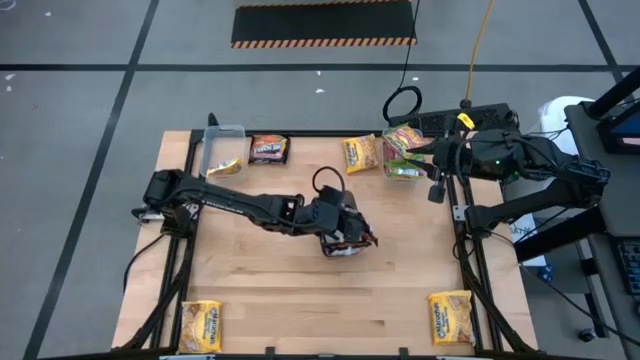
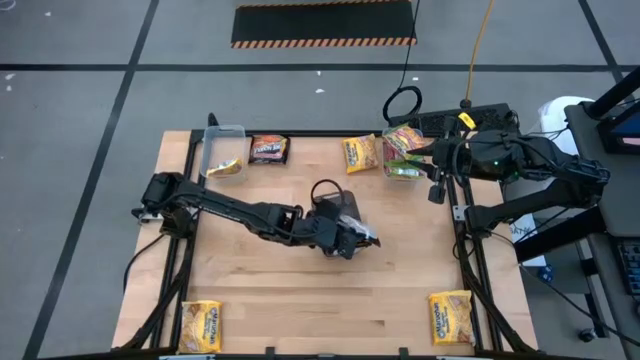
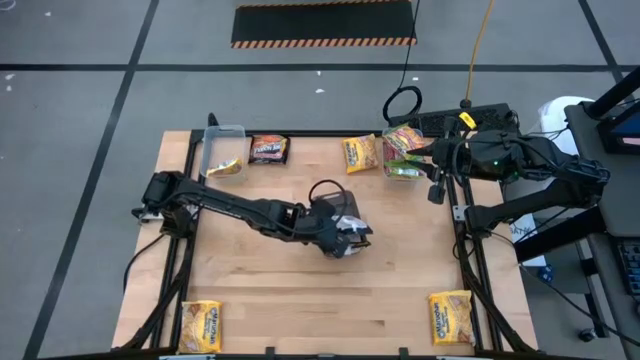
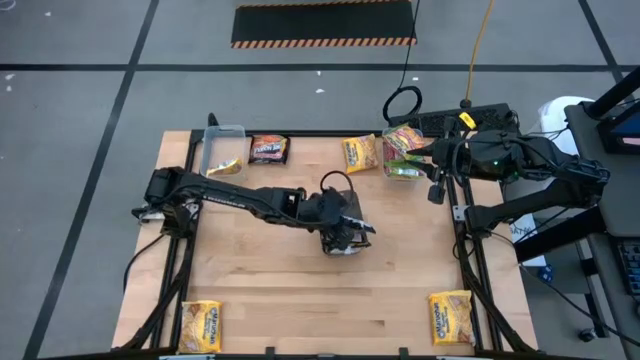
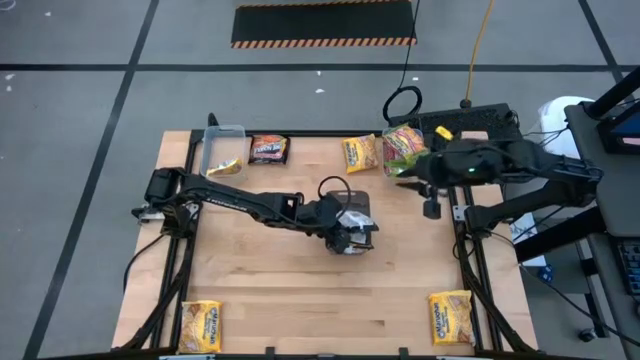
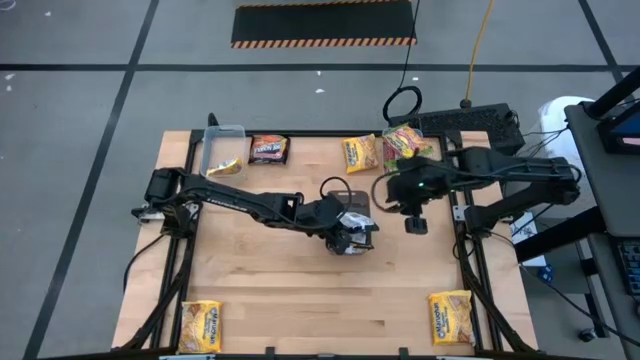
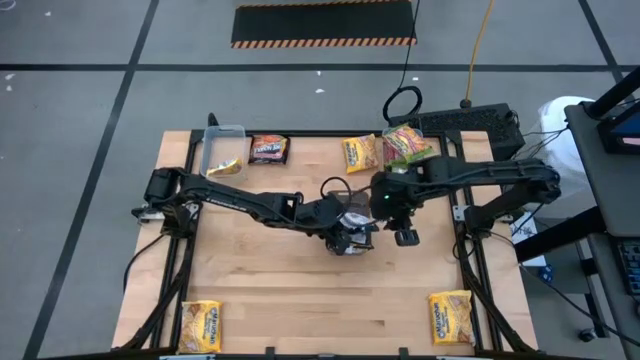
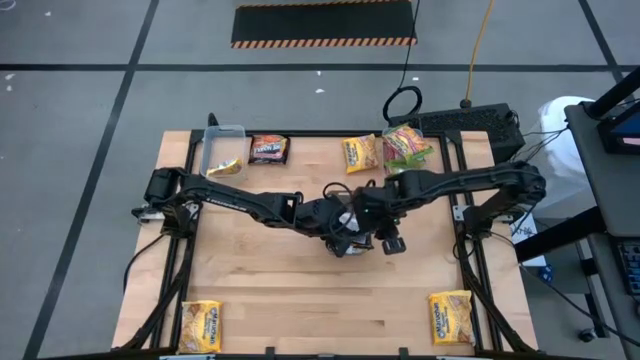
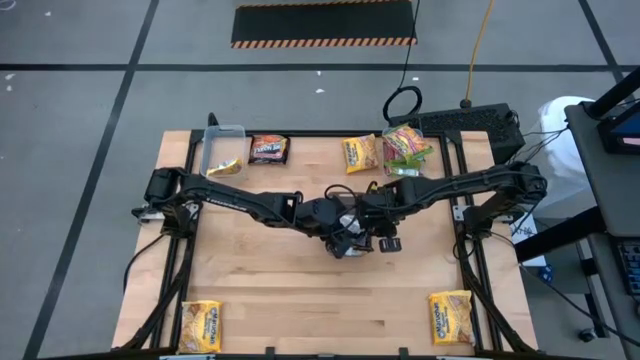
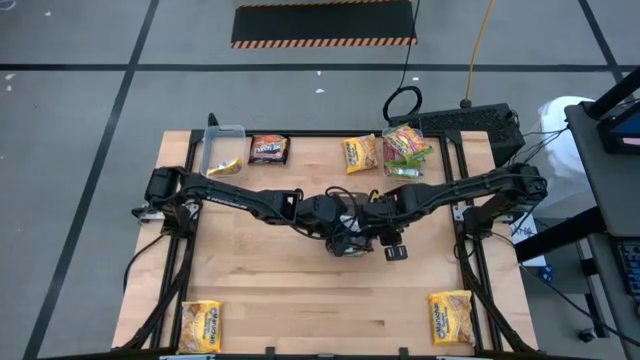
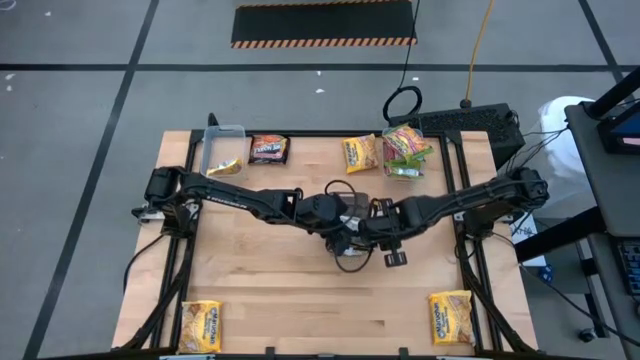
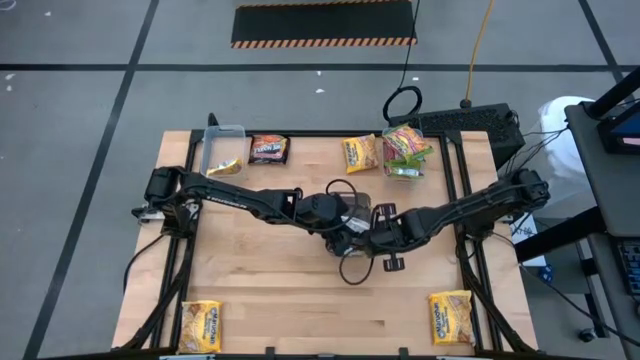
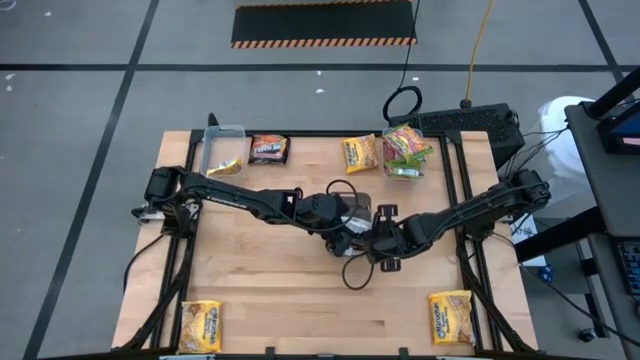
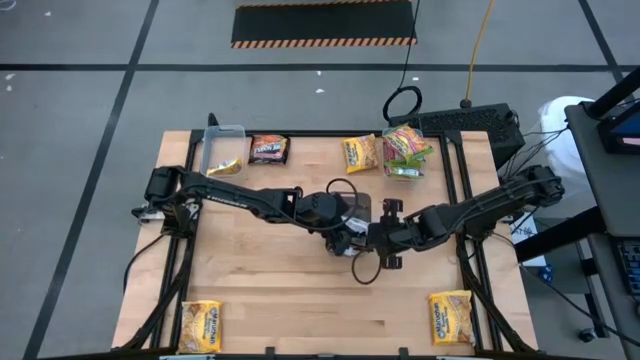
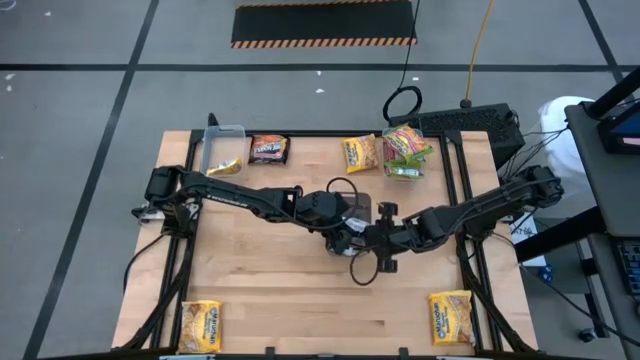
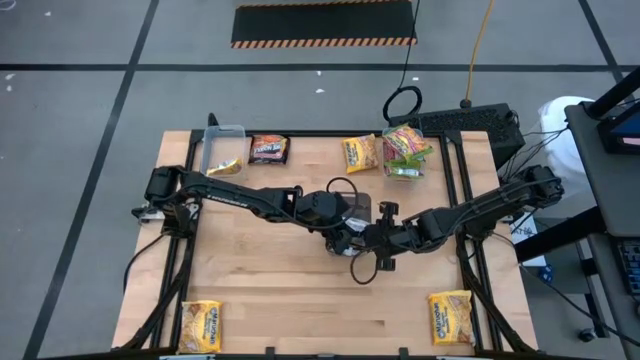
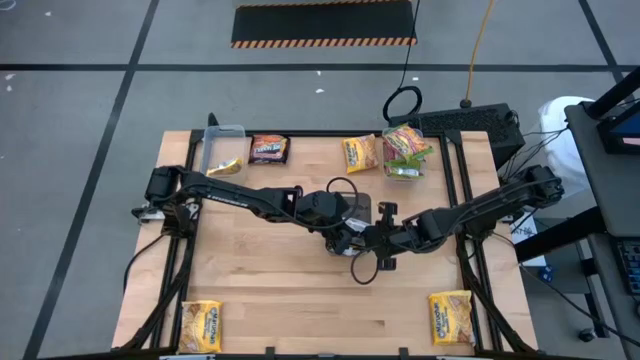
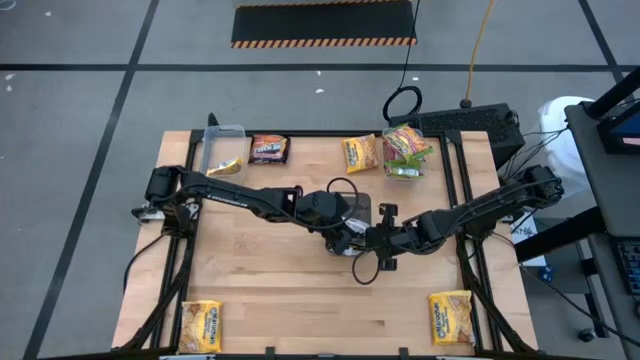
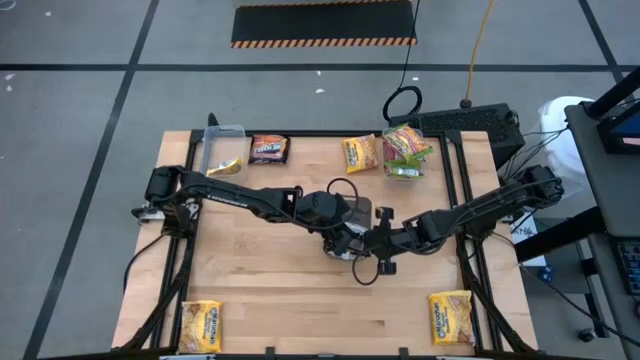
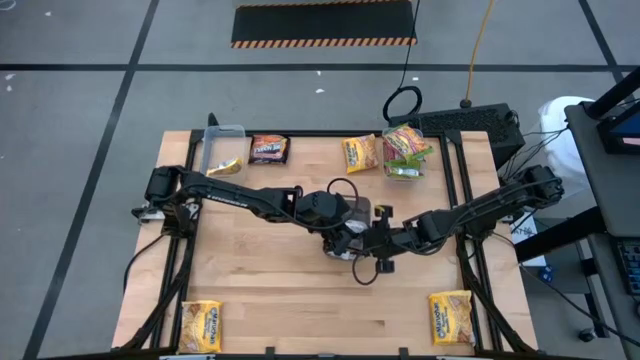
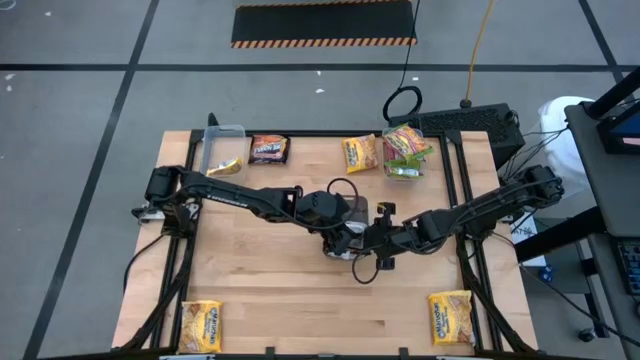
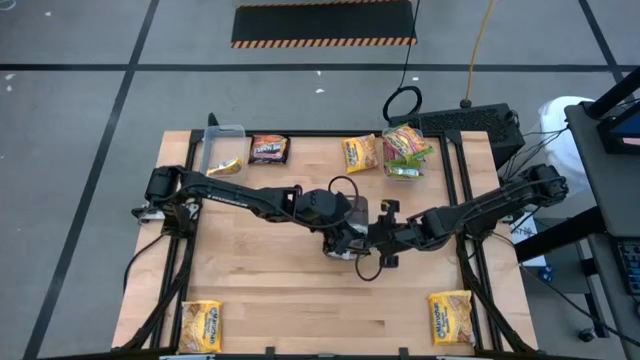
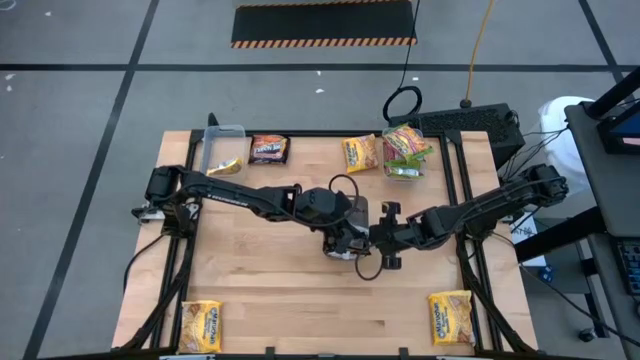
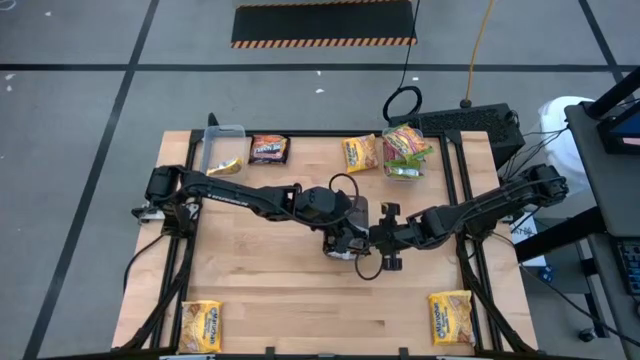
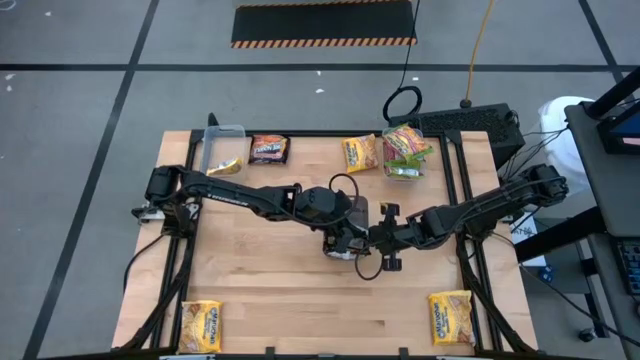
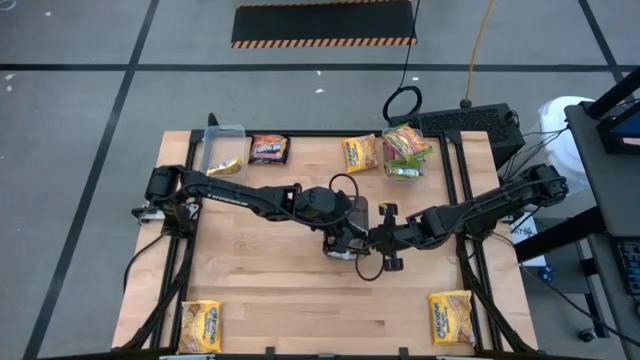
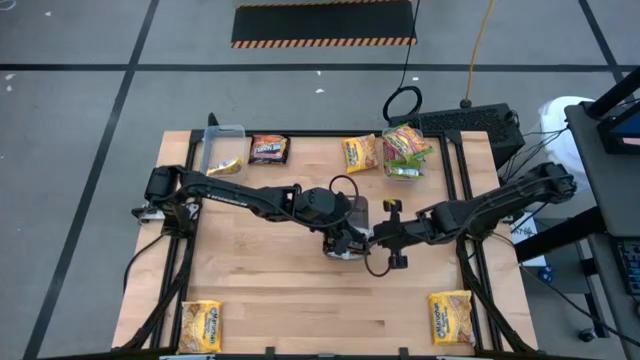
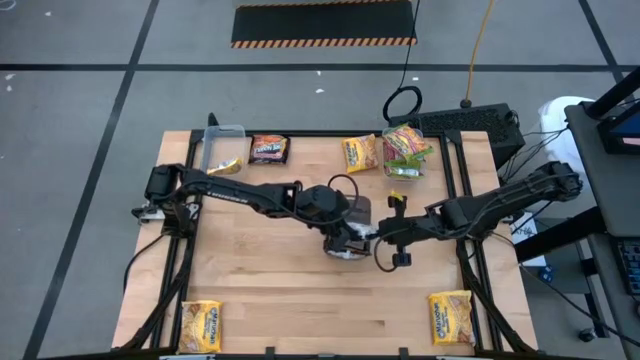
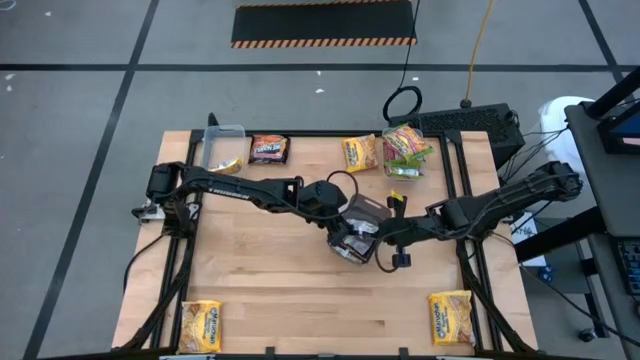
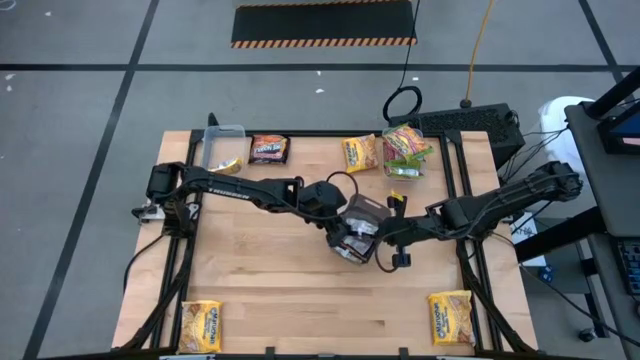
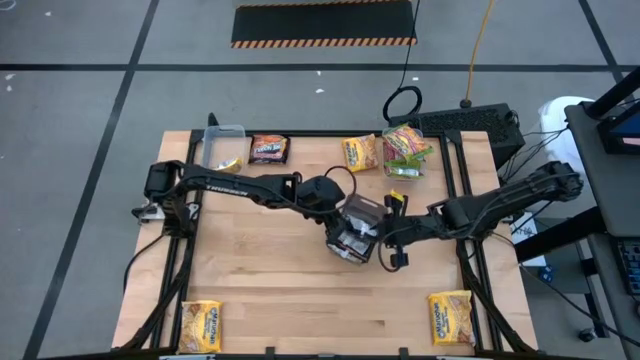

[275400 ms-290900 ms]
Task: Sort Maruchan noodles
Put the bottom black noodle pack into the black bin

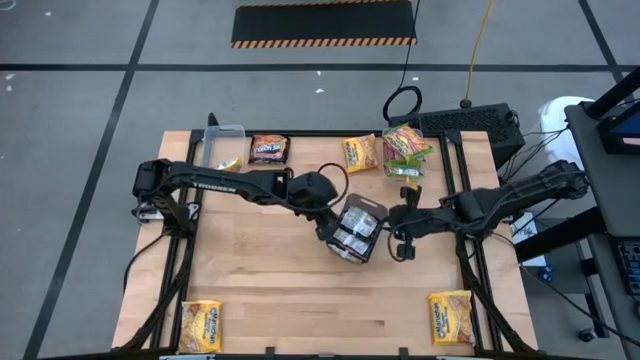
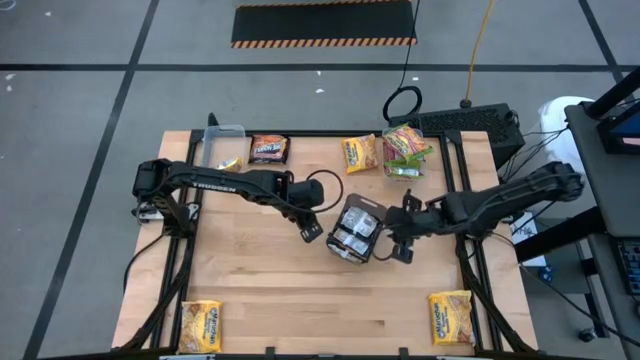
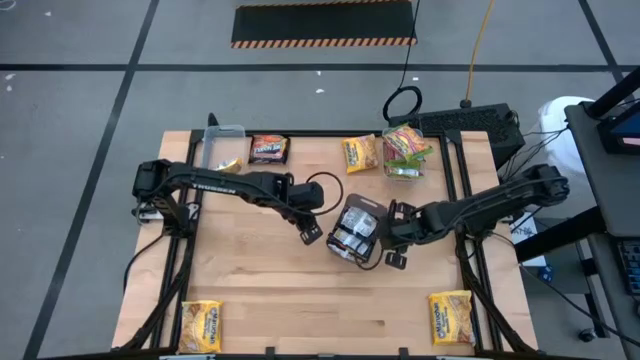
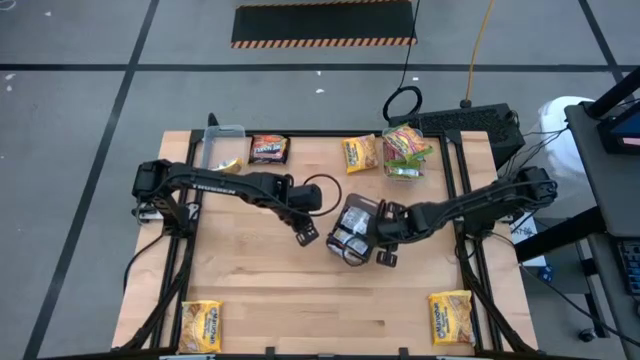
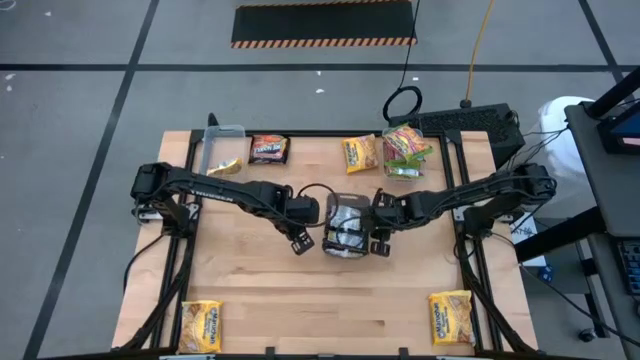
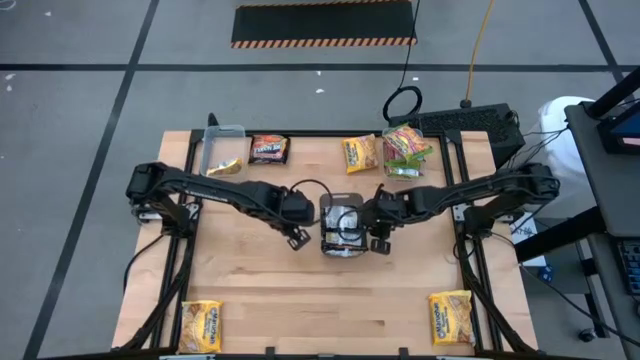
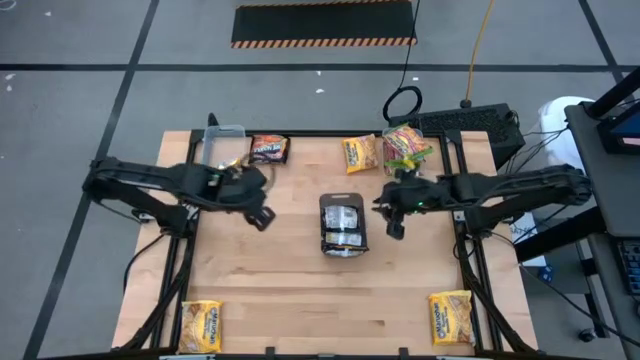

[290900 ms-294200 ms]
Adjust the black bin

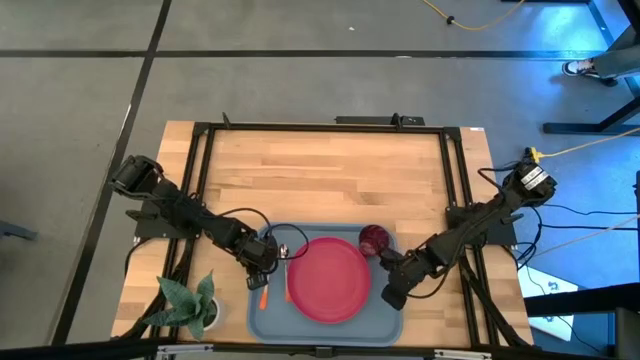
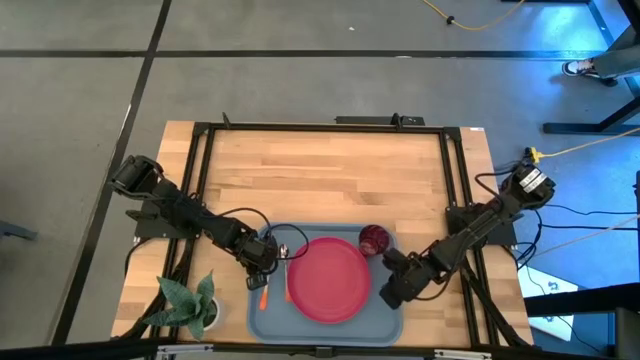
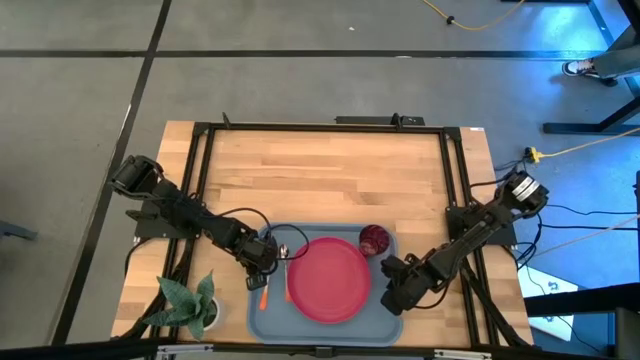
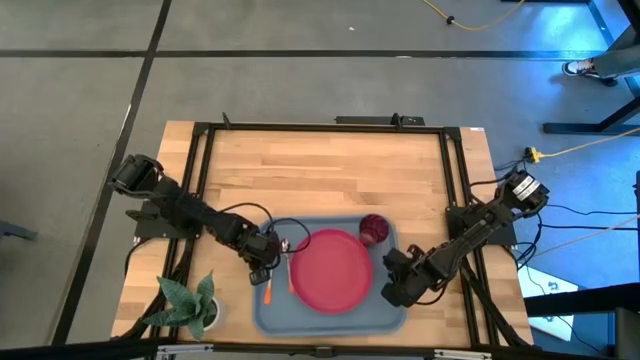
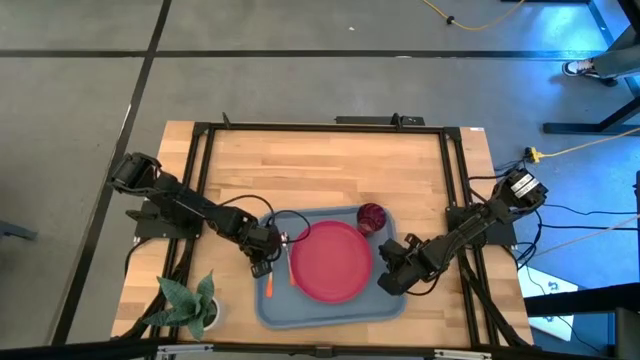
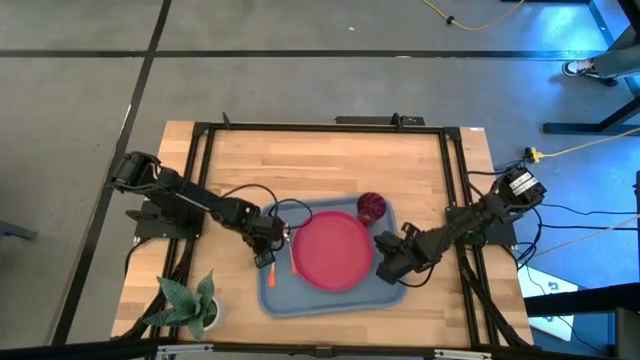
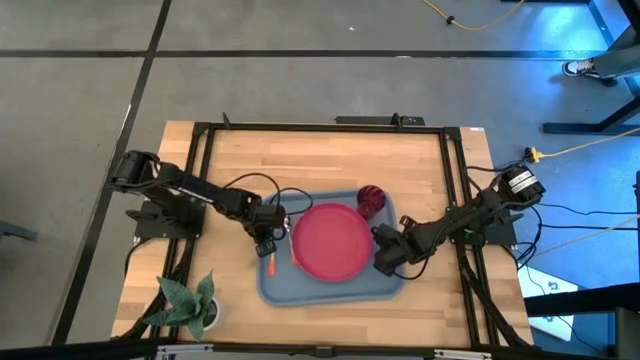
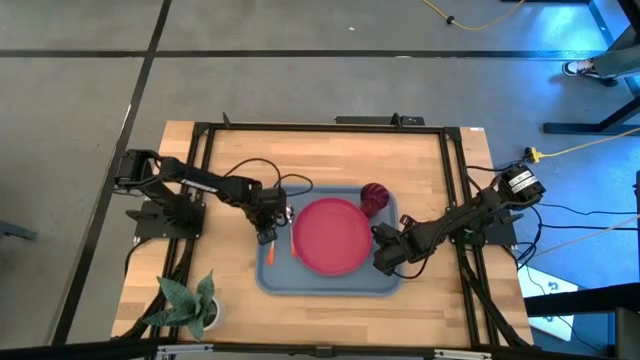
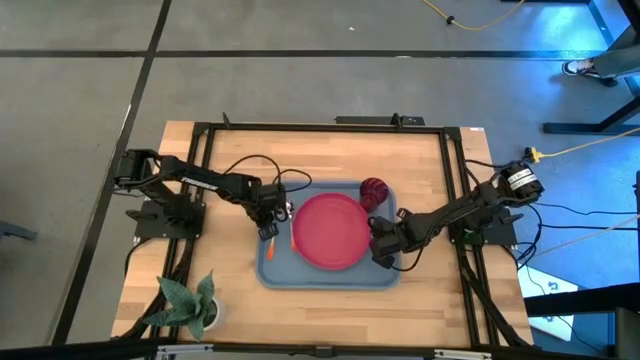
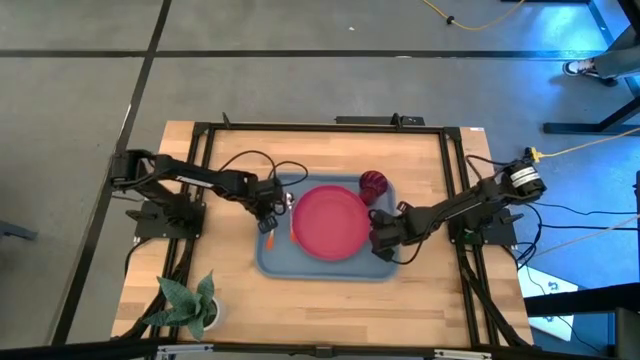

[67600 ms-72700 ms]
Task: Pick and place plate/cup/fork/spoon on tray
Move the blue serving tray to the center of the table
